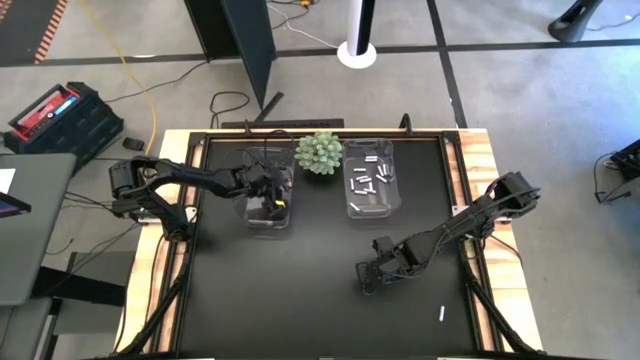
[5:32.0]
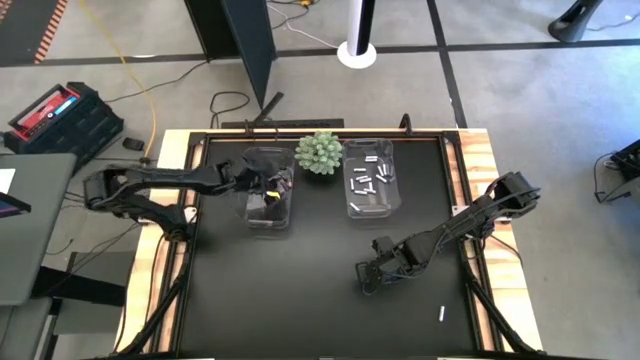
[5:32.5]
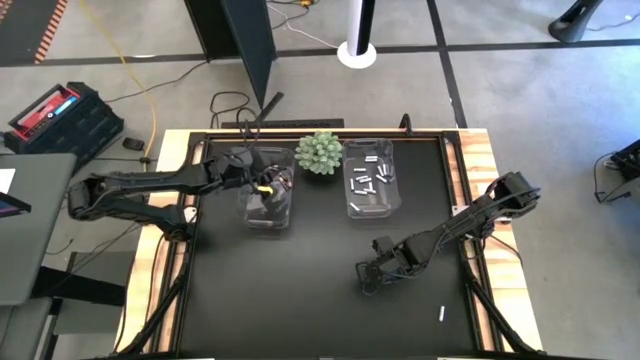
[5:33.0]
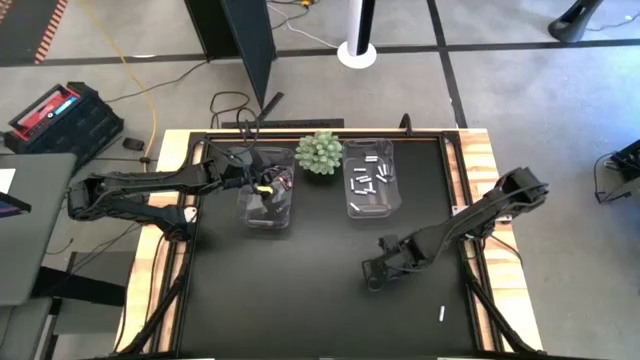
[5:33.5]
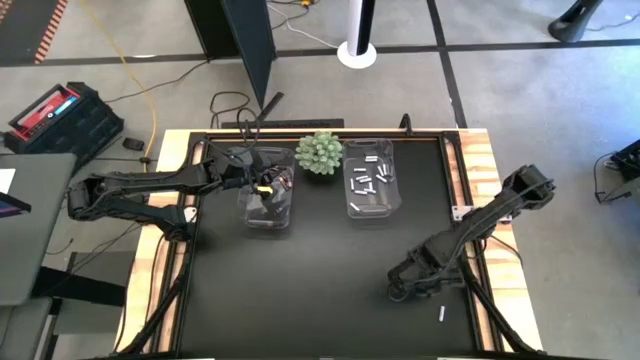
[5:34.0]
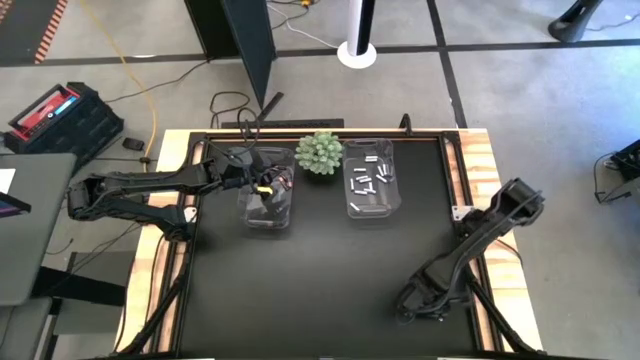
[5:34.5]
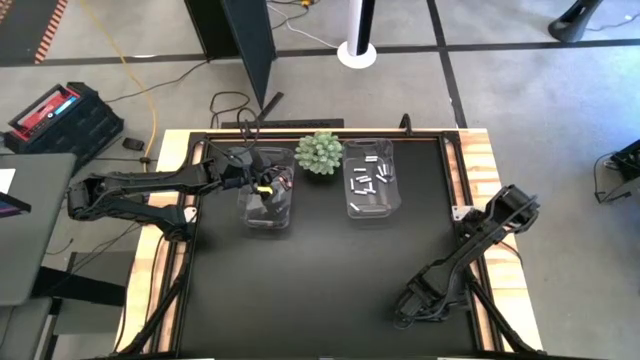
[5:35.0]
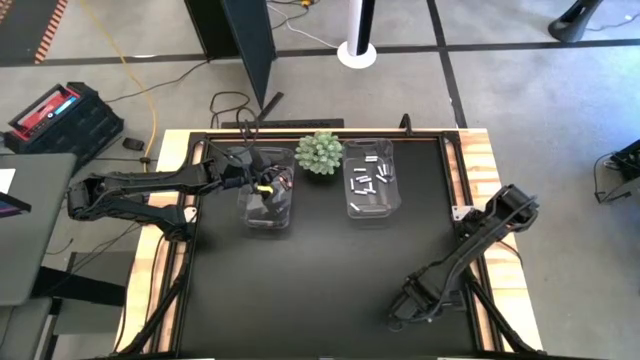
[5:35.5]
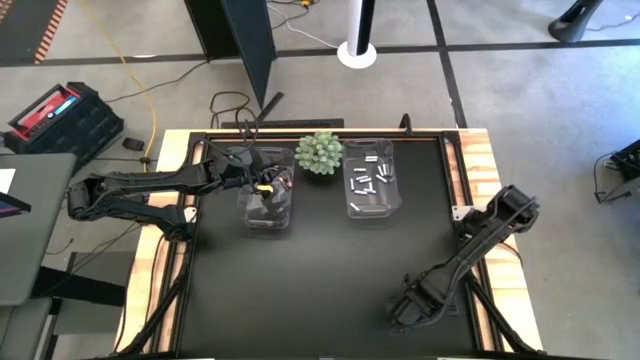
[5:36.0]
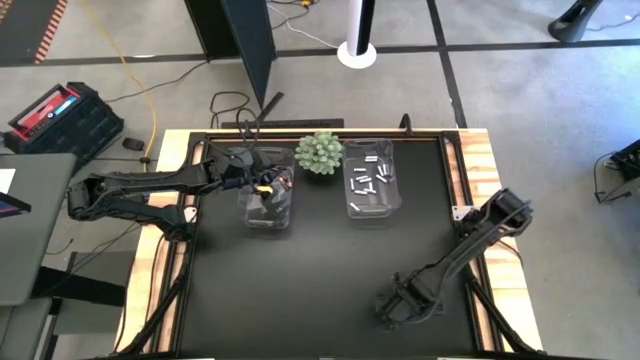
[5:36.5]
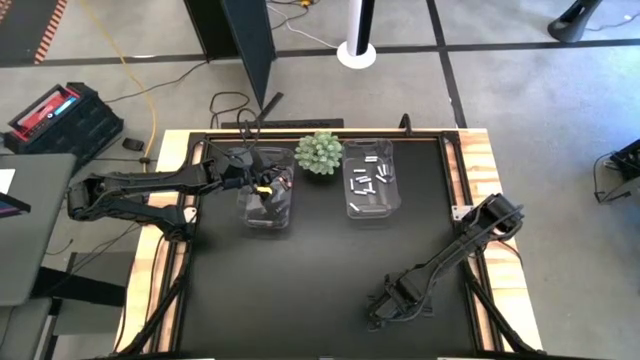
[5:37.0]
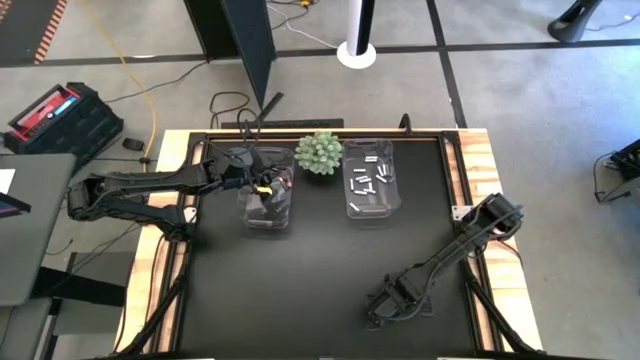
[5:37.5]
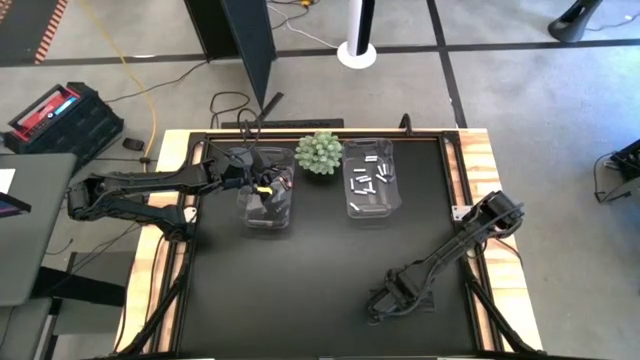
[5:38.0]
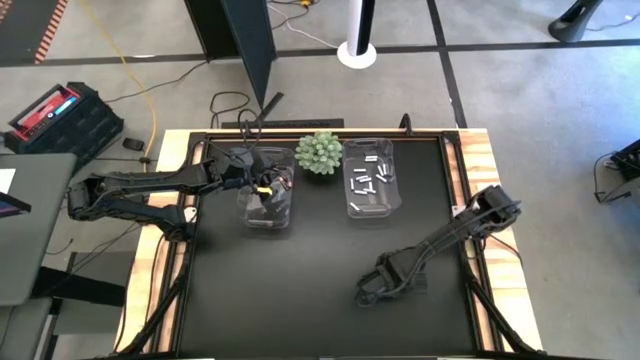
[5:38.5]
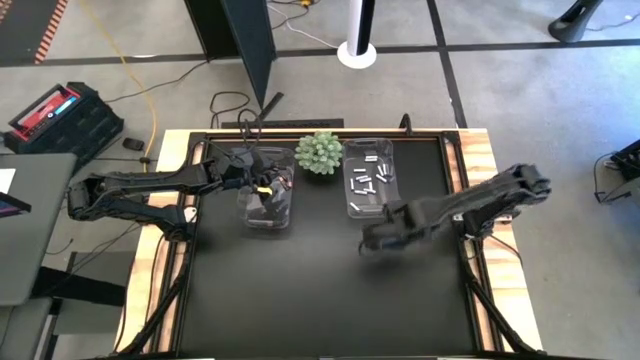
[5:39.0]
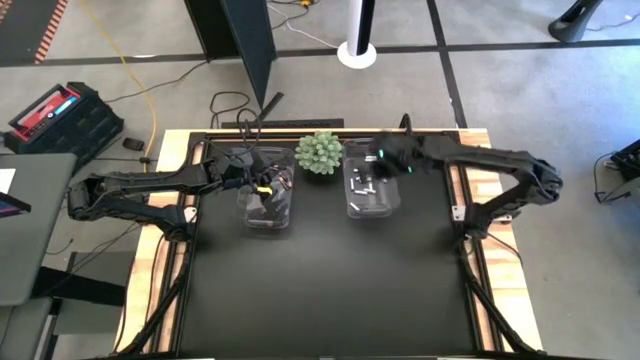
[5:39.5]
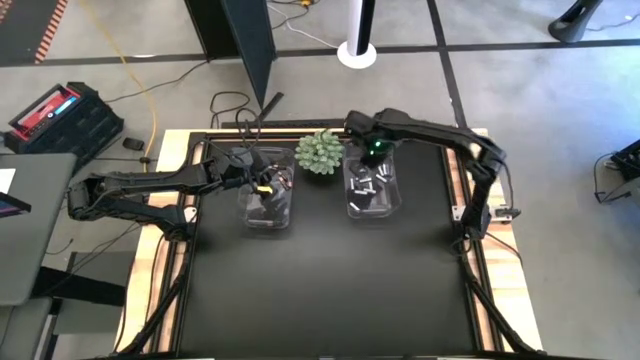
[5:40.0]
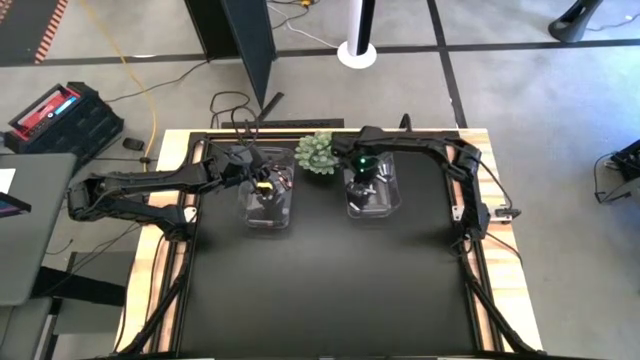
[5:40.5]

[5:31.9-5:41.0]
Task: Sort batteries
Put the white-blue battery into the right transparent bin

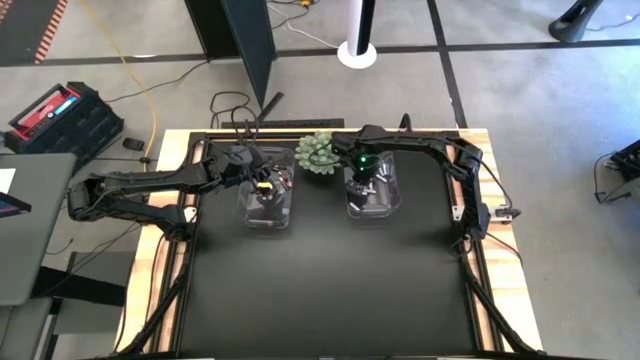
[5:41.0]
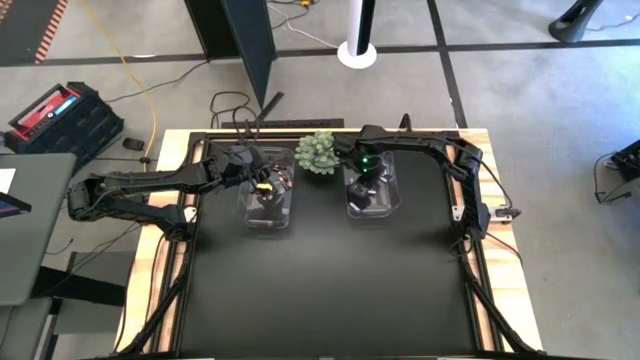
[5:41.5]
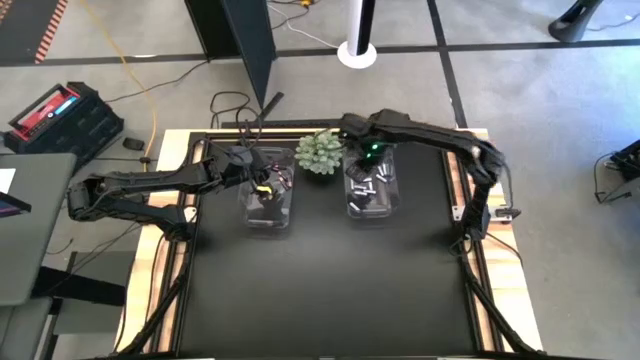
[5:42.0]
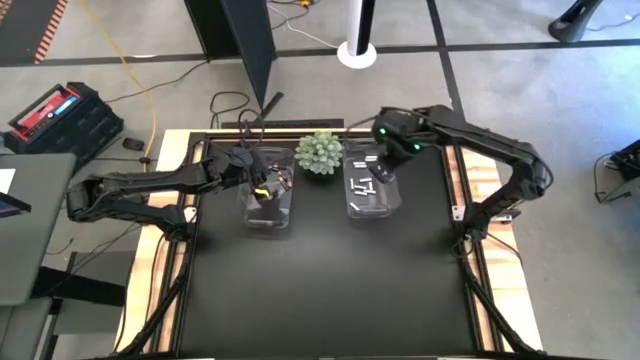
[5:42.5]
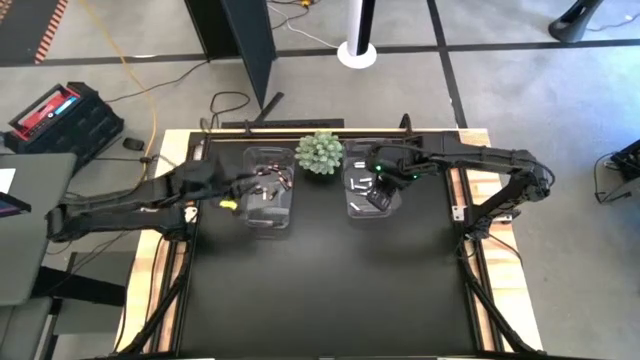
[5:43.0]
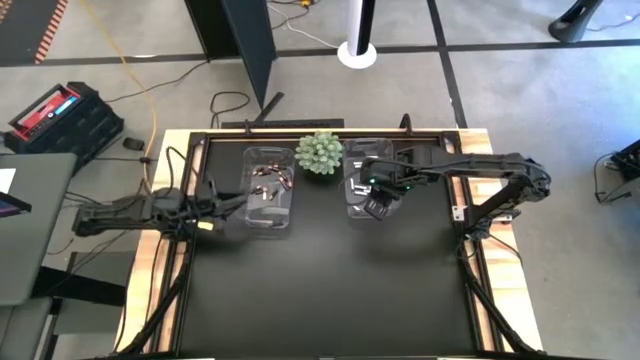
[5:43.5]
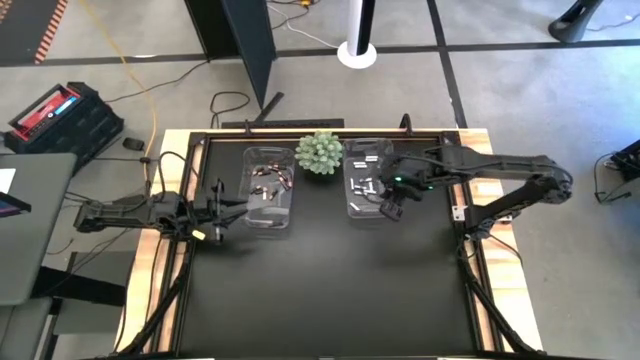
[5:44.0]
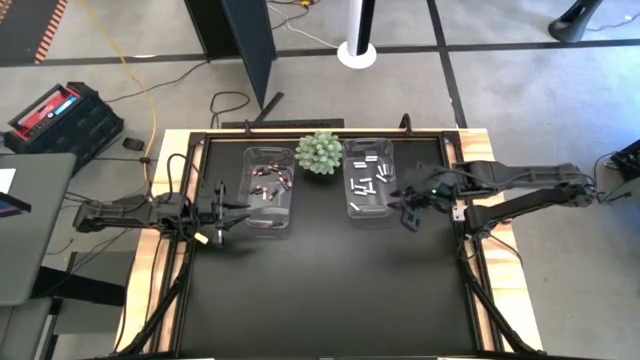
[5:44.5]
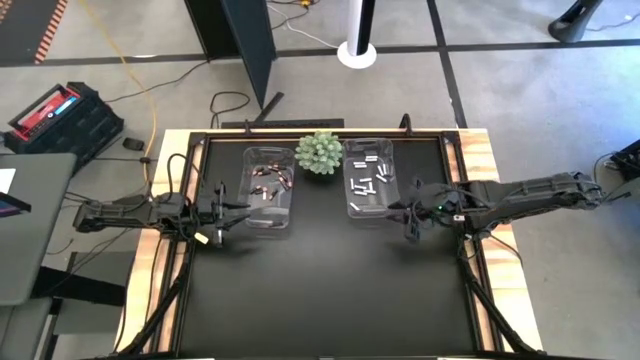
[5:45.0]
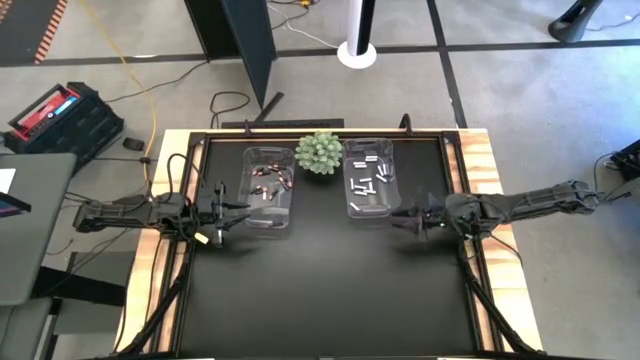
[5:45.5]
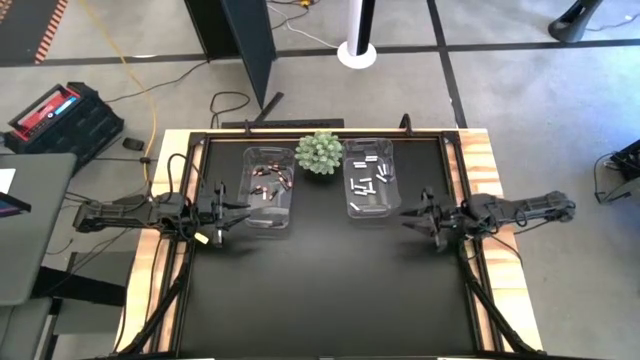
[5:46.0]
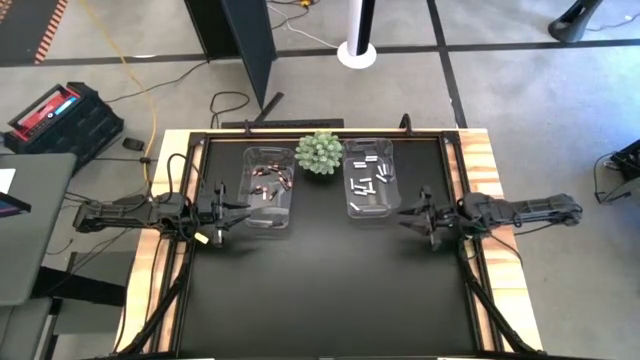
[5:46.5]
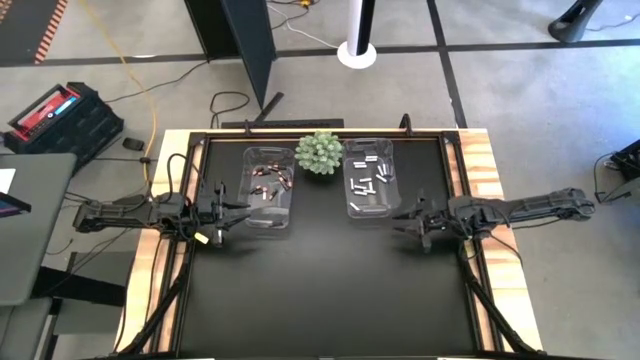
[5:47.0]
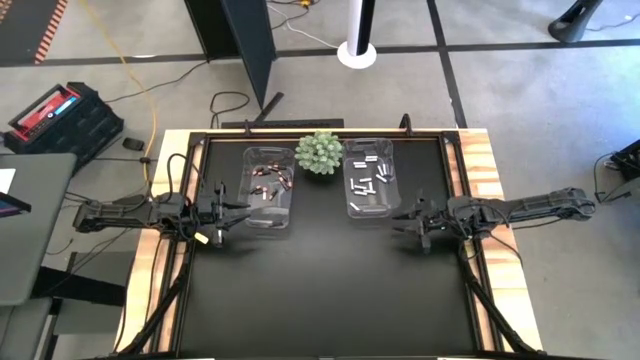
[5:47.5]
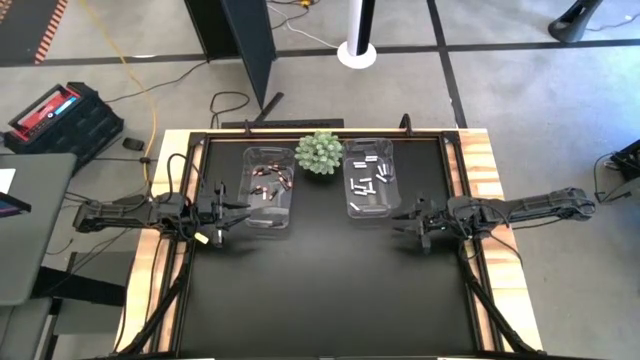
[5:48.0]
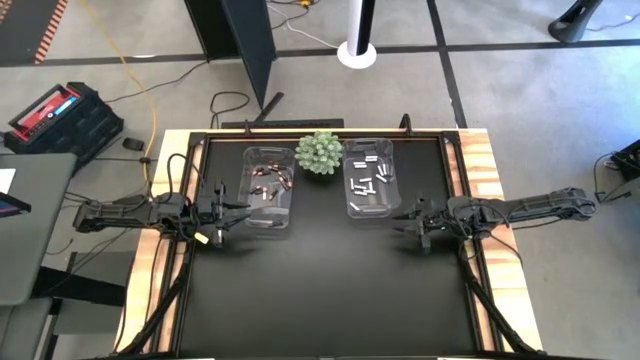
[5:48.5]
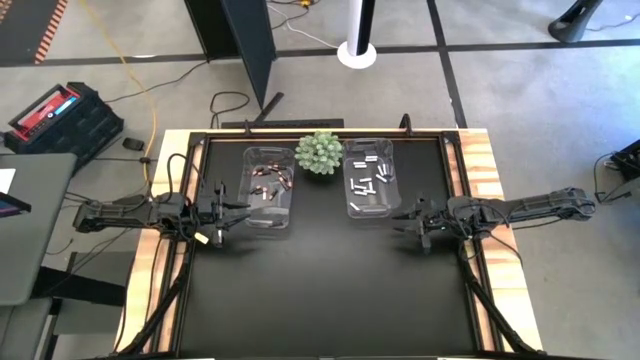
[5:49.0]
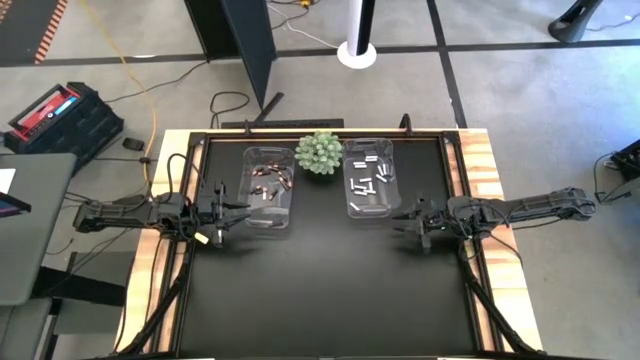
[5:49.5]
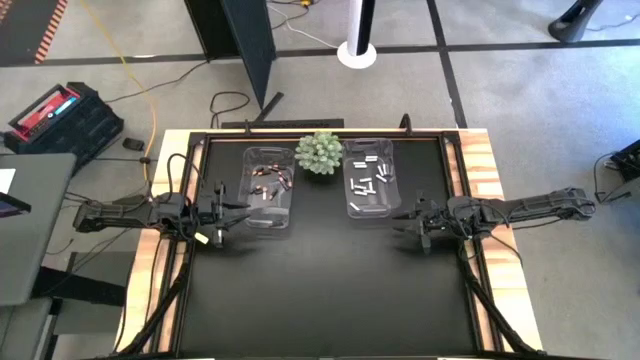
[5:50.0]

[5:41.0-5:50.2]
Return to Home Position

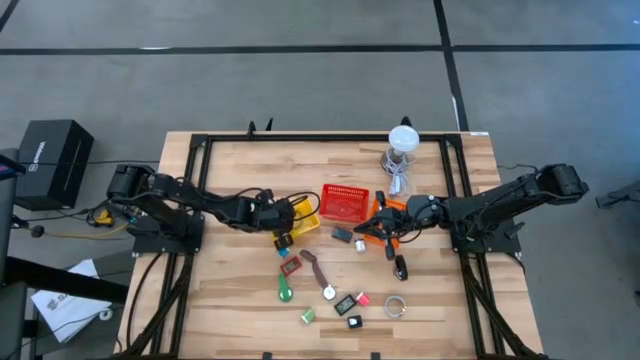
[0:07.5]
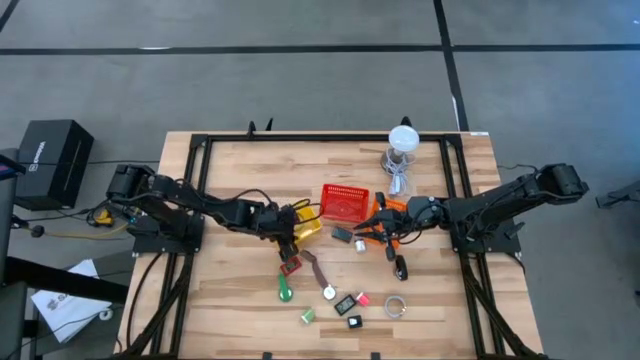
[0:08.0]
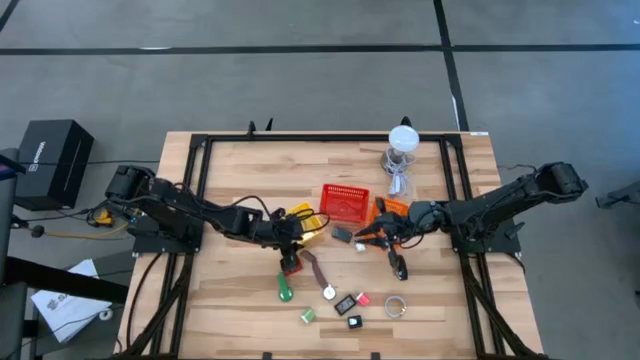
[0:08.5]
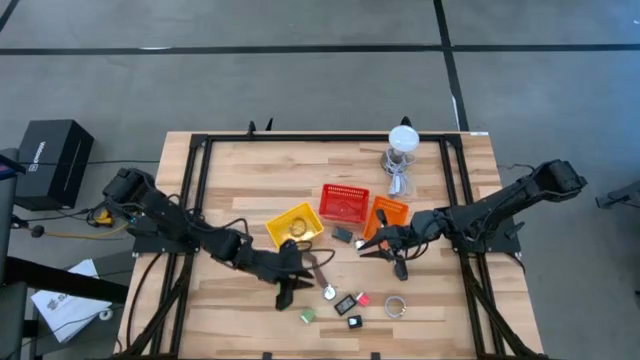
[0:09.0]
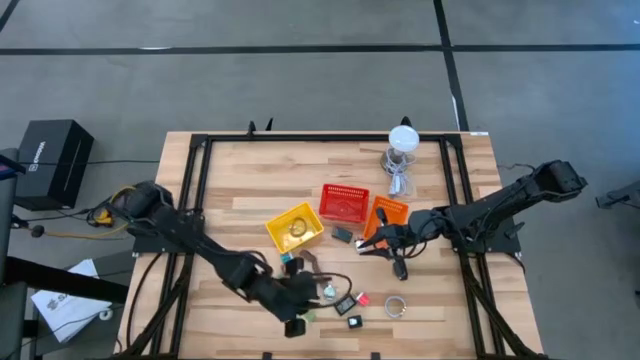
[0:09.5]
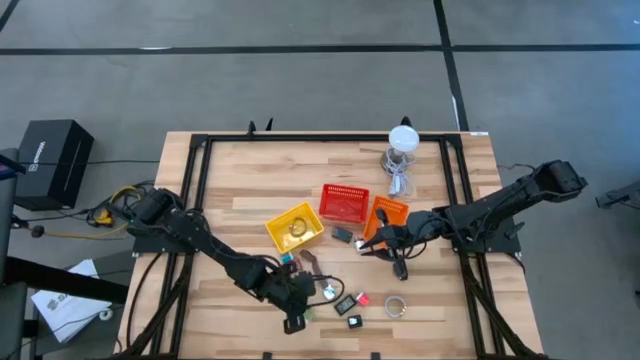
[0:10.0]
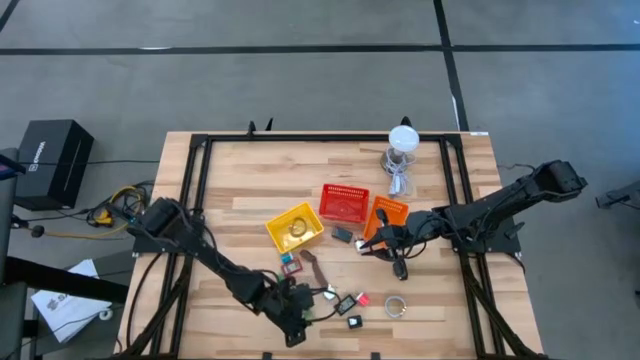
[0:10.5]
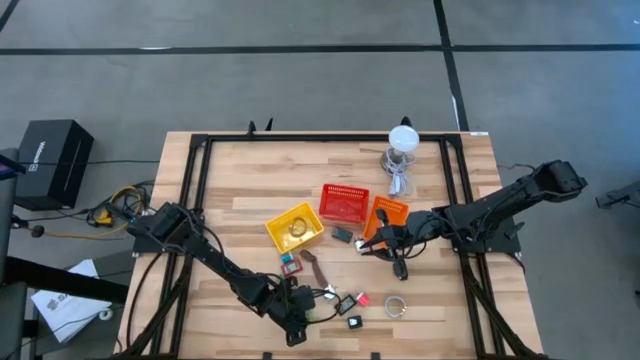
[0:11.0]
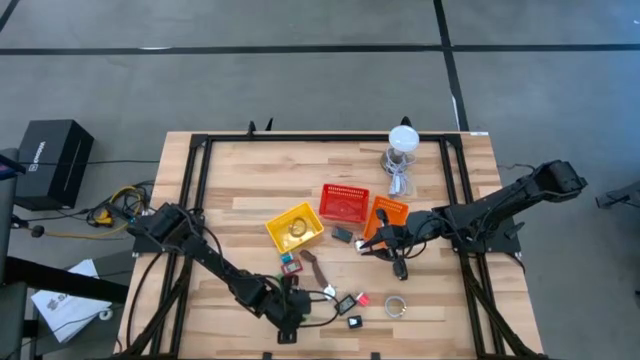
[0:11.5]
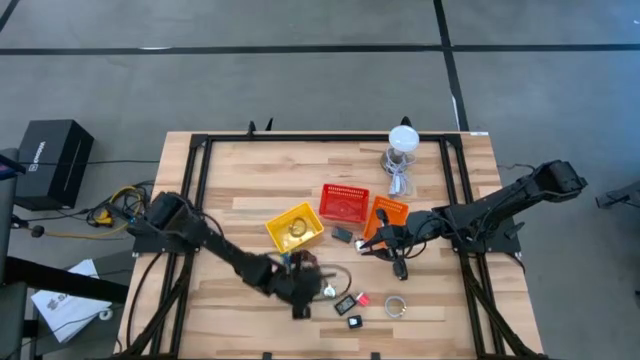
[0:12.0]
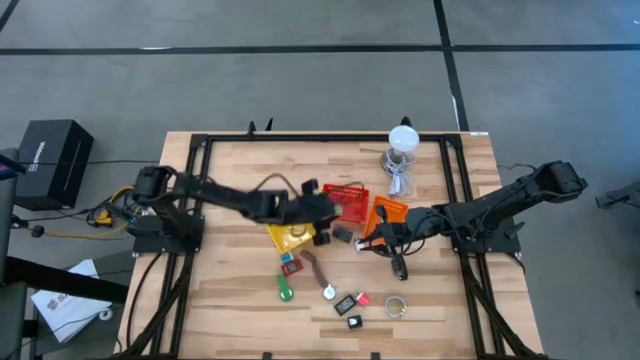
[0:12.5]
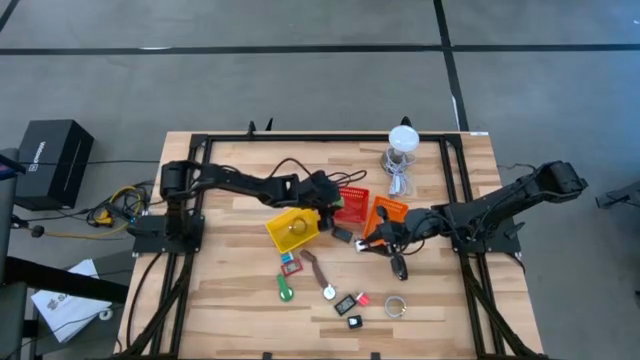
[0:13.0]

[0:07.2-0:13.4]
Task: Pick & Place Office items
Put the green charger adapter into the red bin
